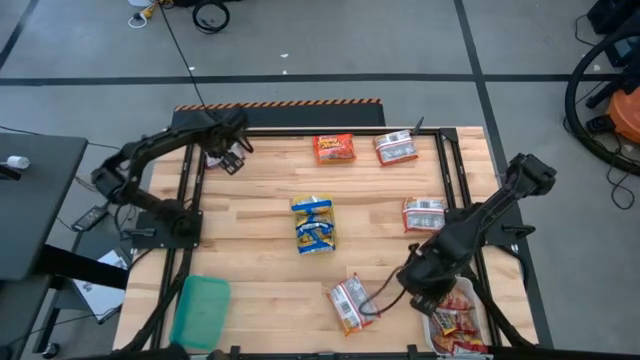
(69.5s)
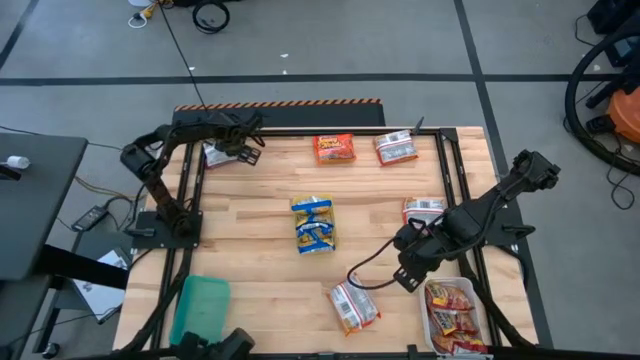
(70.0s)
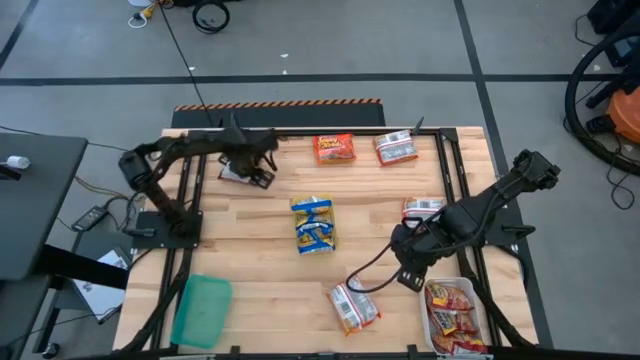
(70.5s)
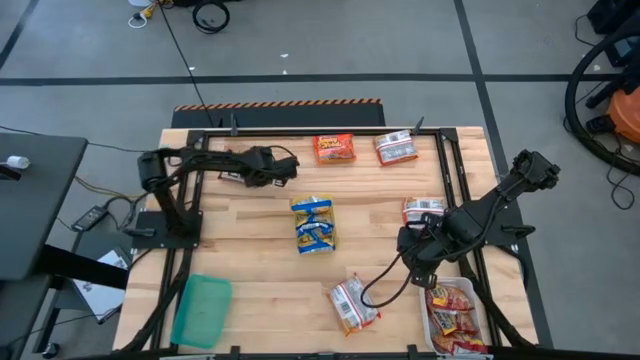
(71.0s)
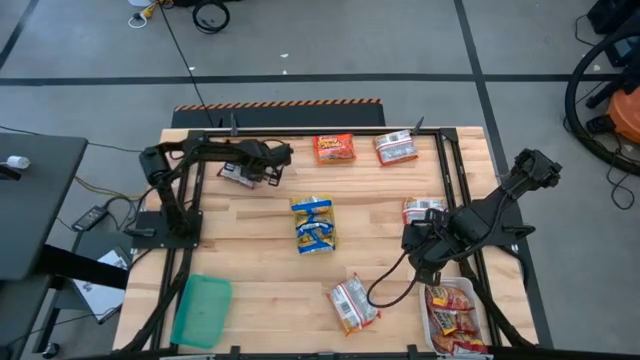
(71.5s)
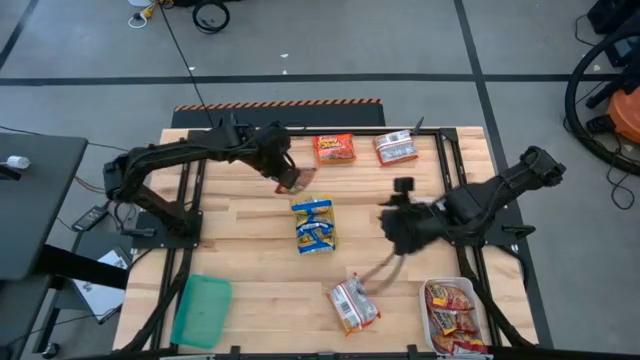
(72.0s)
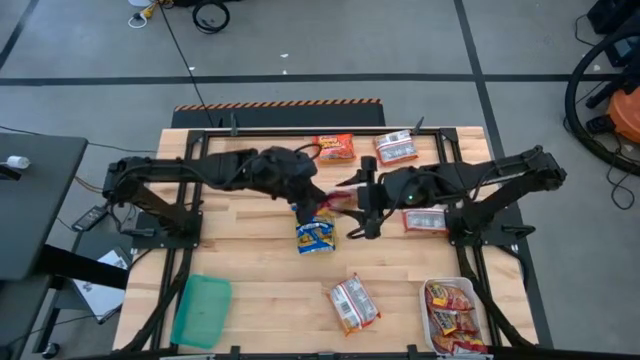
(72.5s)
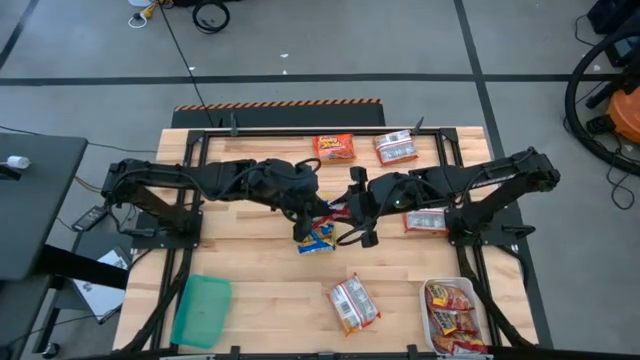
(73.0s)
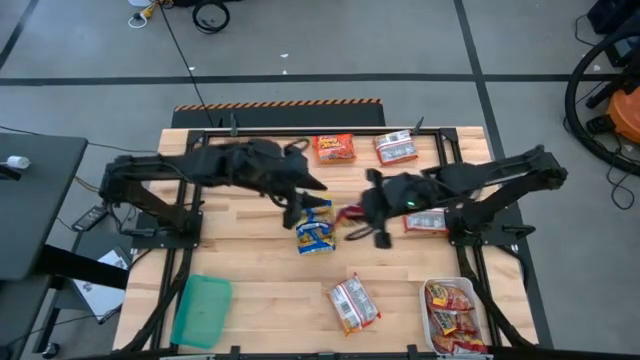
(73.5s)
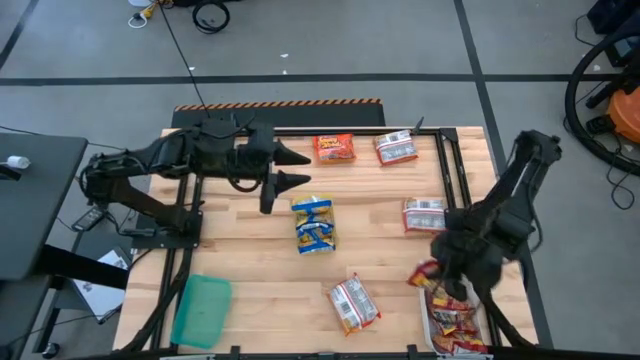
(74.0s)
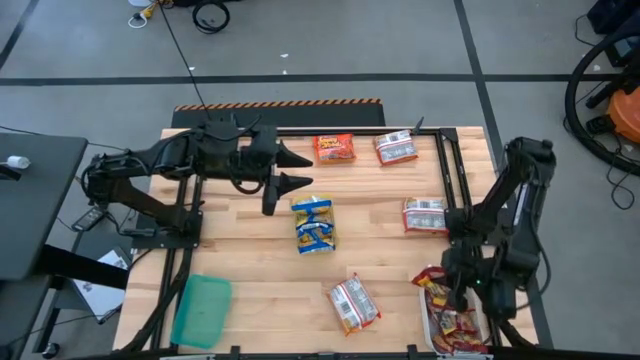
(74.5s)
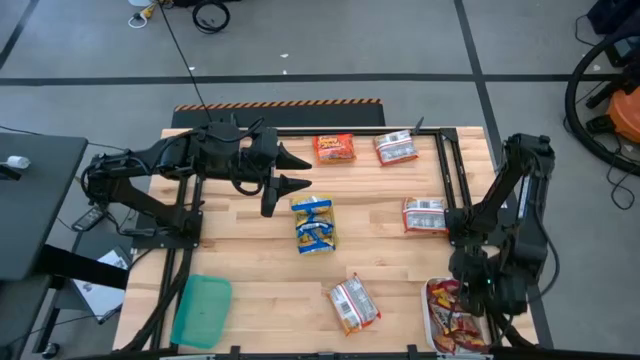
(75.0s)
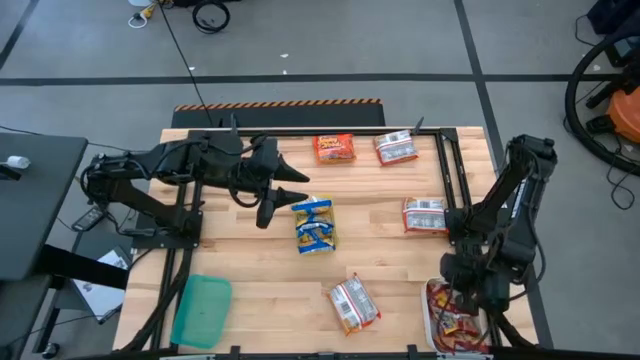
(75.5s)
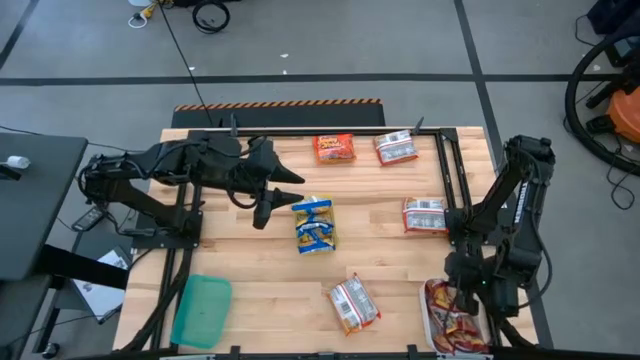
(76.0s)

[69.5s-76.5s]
Task: Sort Maruchan noodles
Put the red noodle pack into the white bin

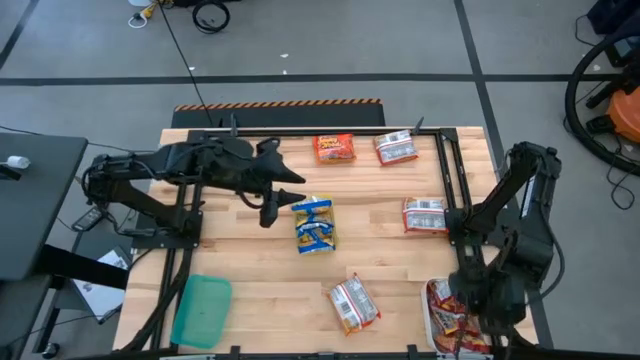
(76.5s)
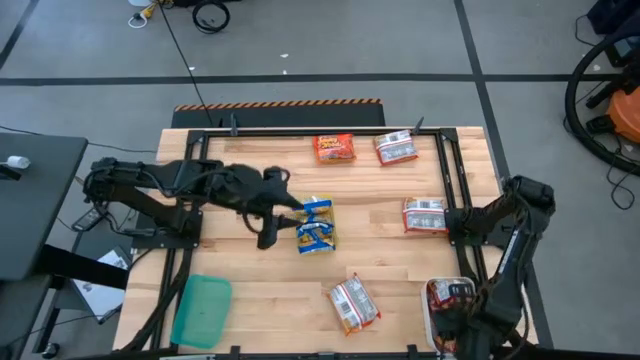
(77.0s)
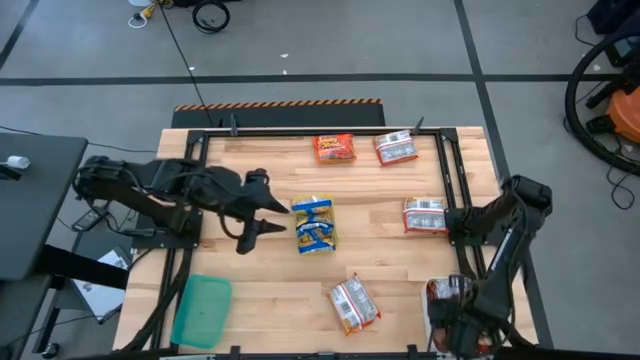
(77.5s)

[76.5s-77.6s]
Adjust the red noodle pack in the white bin

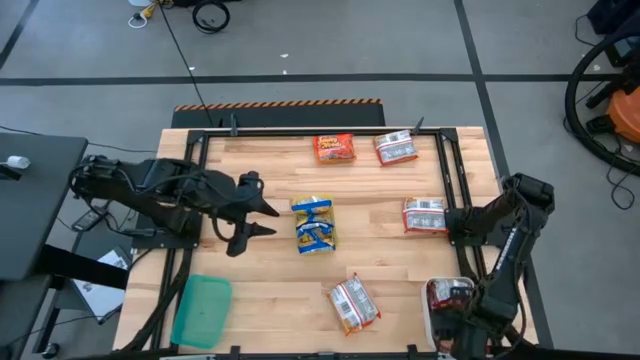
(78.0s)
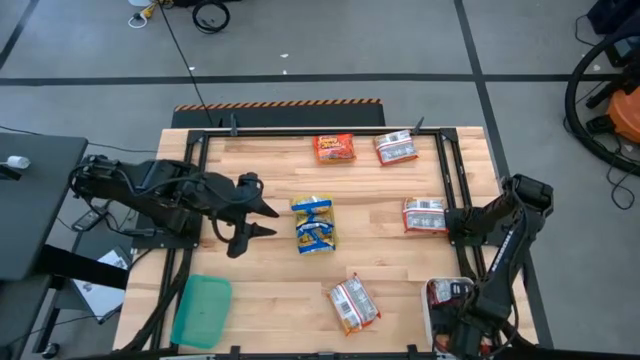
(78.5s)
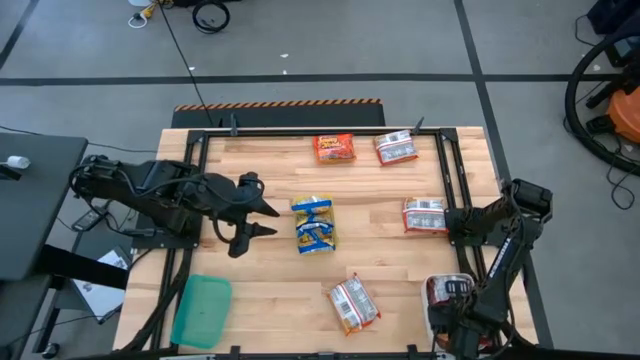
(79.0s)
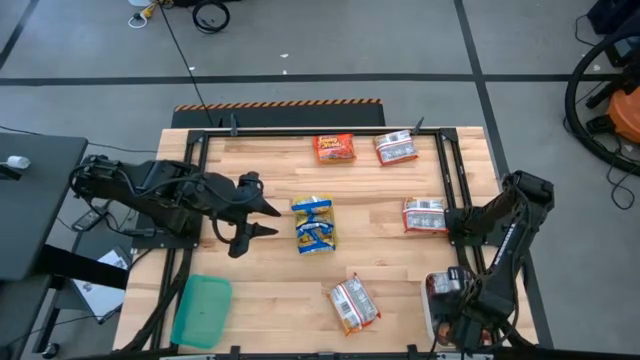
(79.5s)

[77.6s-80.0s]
Adjust the red noodle pack in the white bin

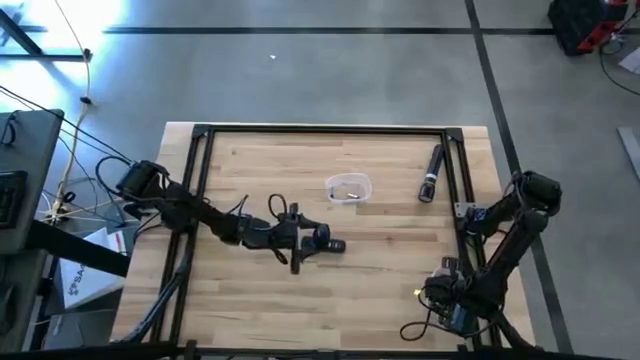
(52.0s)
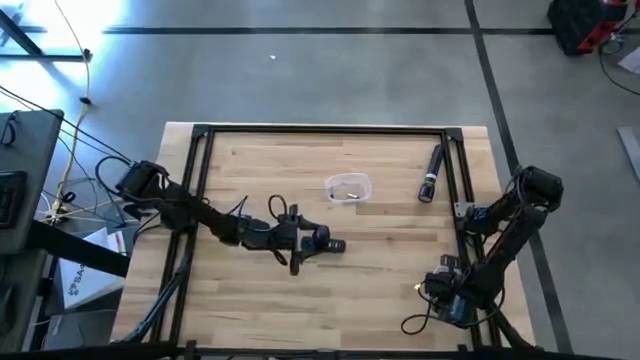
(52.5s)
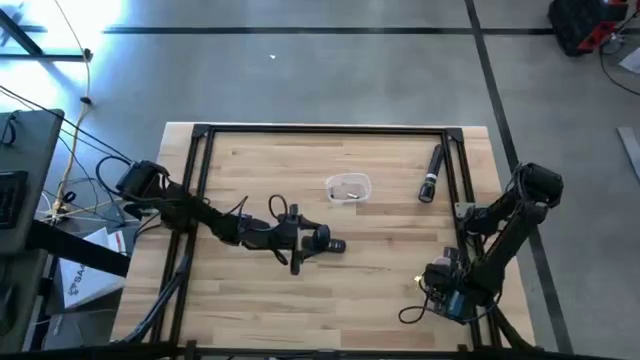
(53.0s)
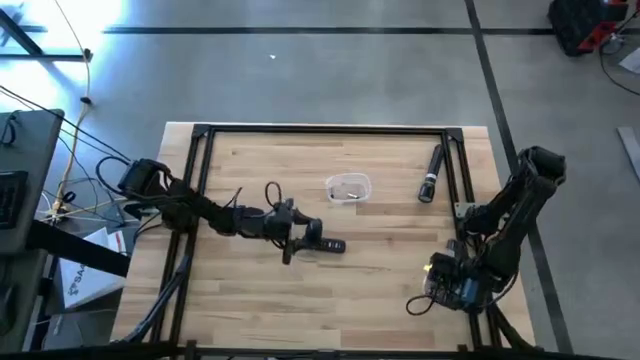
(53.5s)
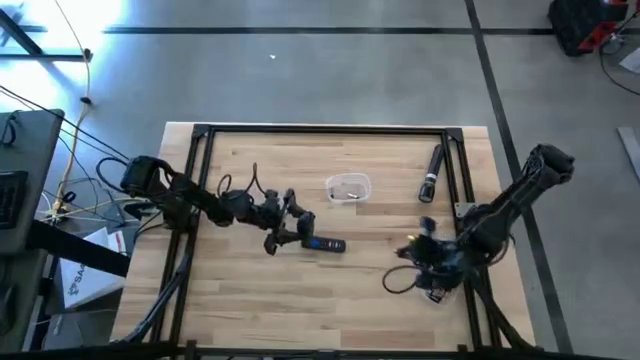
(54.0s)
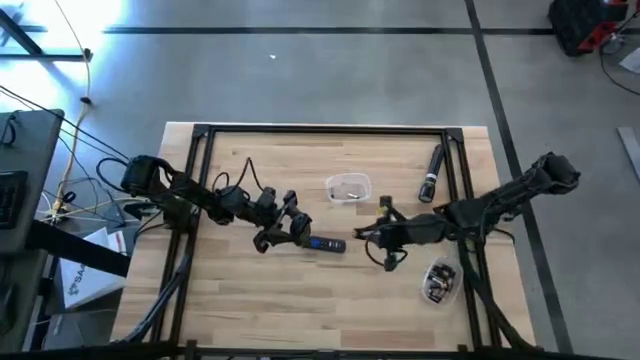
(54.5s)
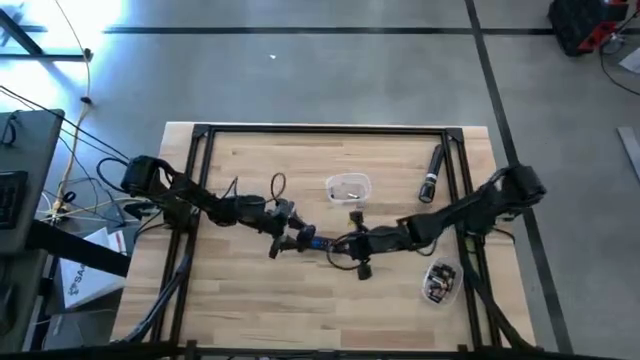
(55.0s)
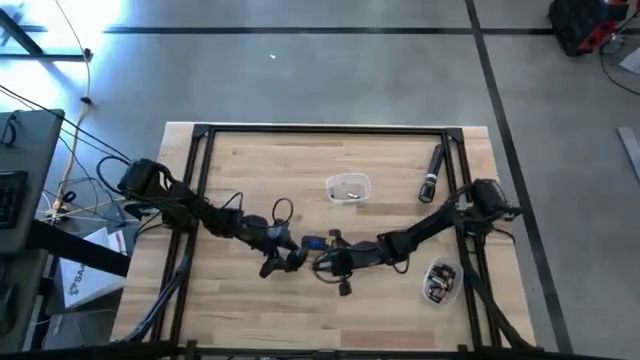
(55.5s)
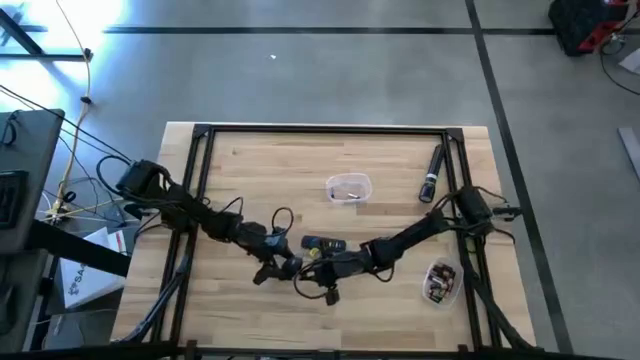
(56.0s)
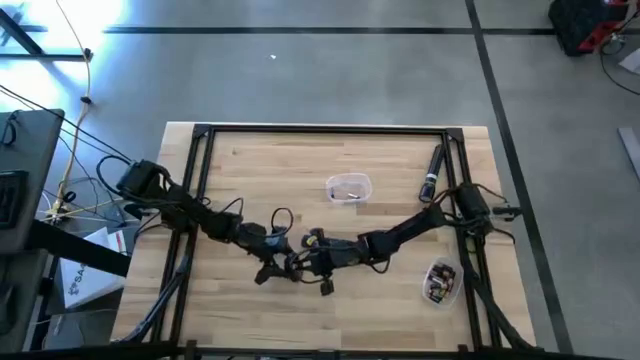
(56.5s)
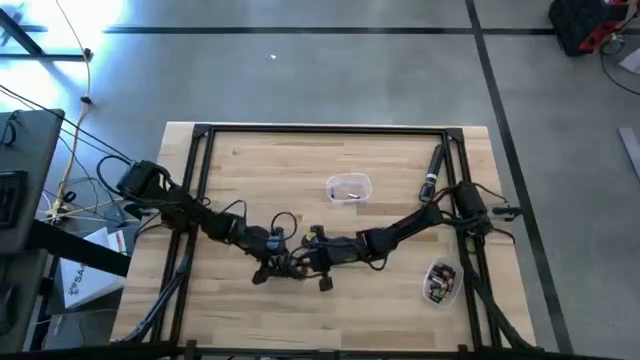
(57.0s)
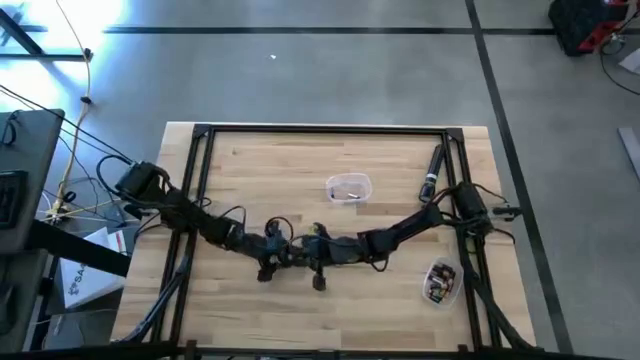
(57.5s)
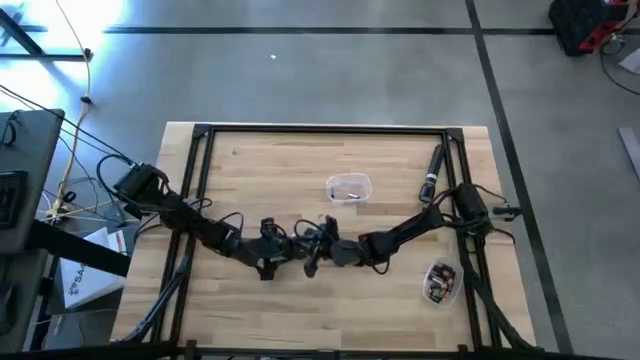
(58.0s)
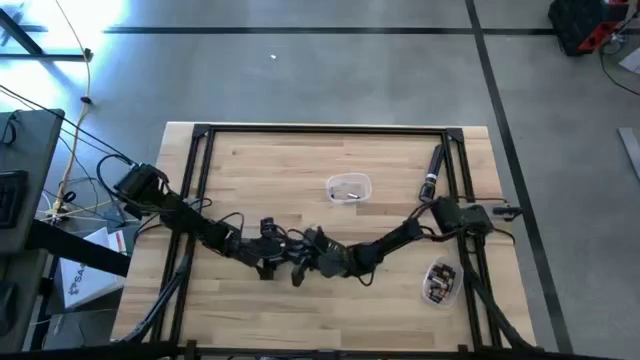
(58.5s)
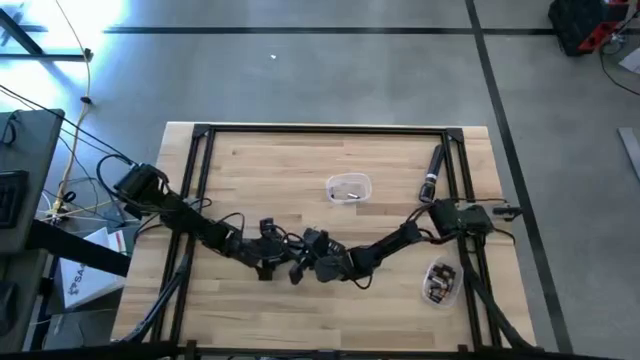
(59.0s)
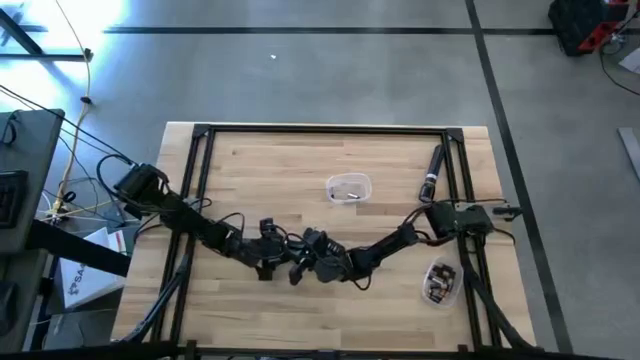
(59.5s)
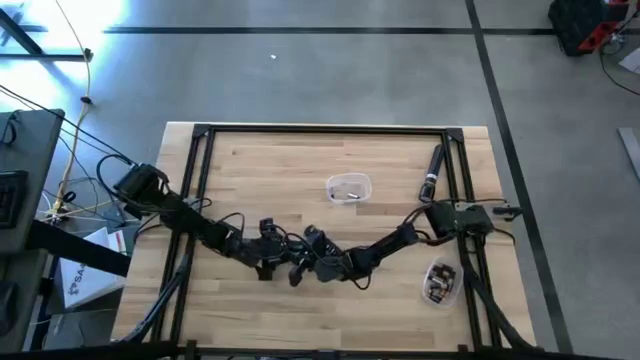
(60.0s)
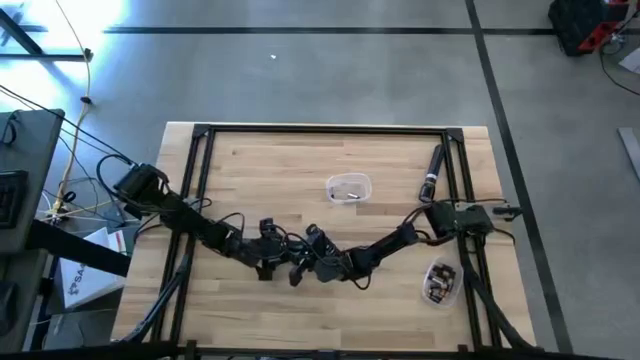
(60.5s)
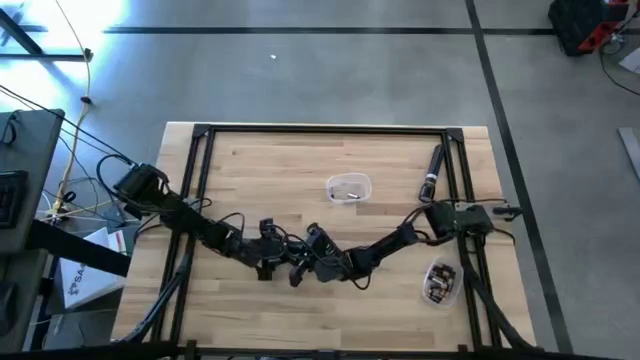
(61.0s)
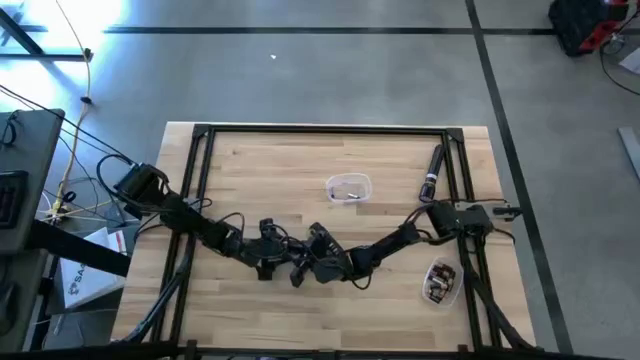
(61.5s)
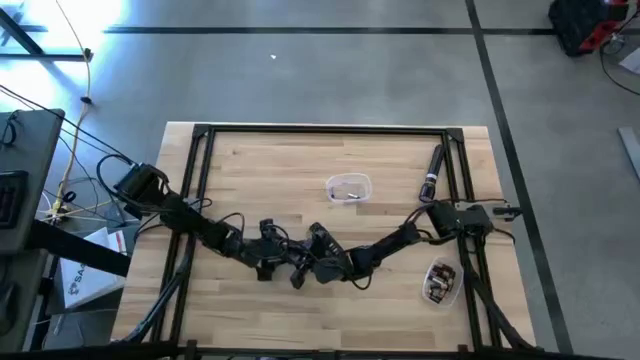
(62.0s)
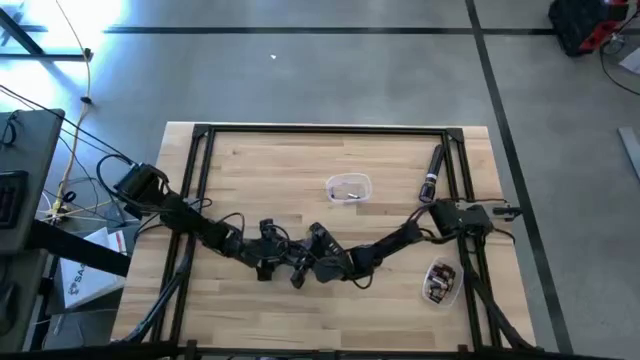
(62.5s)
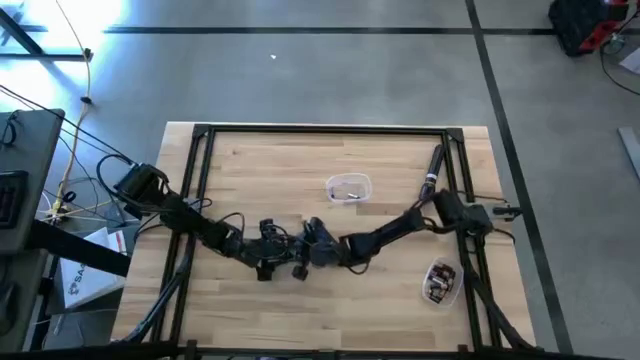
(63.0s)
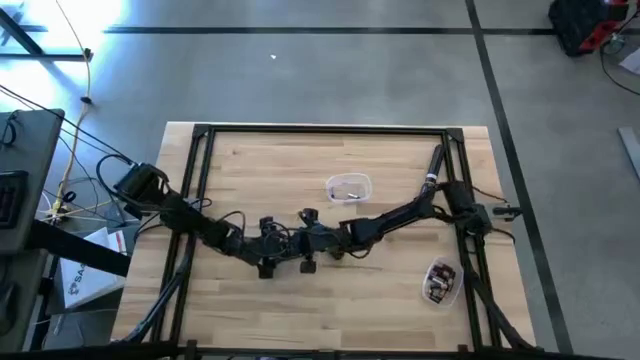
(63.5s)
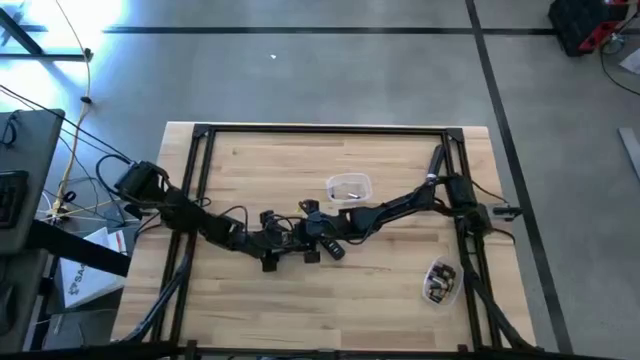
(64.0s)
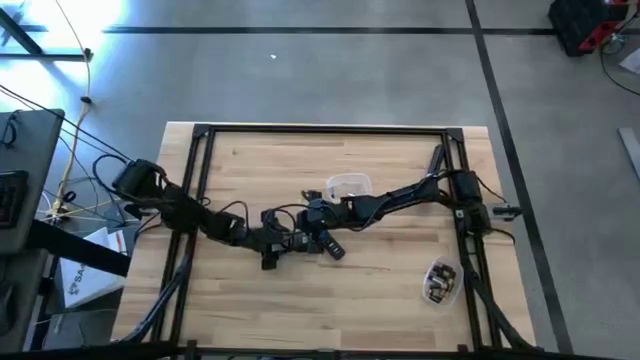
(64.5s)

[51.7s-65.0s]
Task: Insert battery
Insert the black battery into the computer mouse
